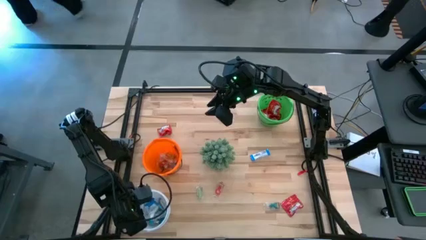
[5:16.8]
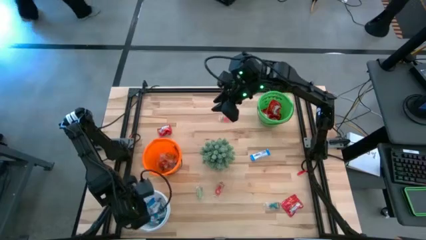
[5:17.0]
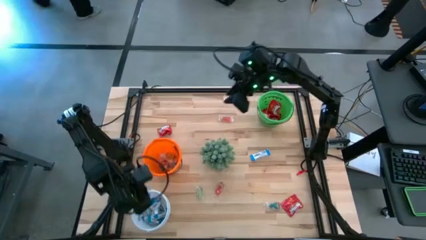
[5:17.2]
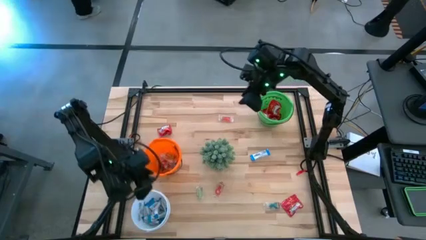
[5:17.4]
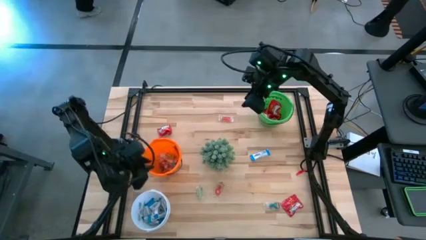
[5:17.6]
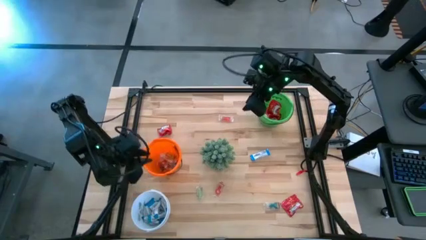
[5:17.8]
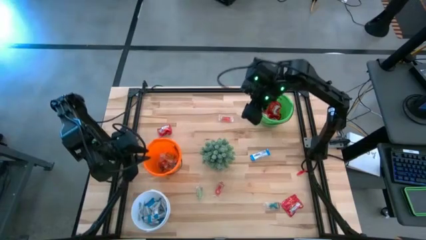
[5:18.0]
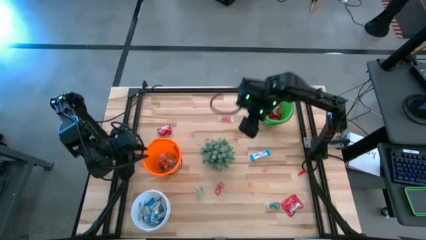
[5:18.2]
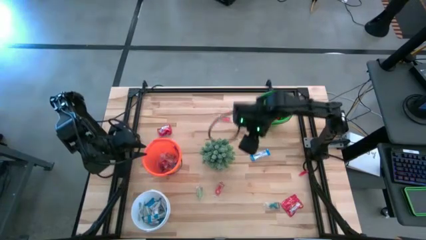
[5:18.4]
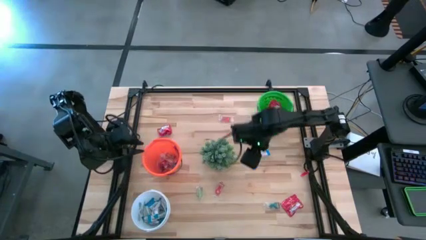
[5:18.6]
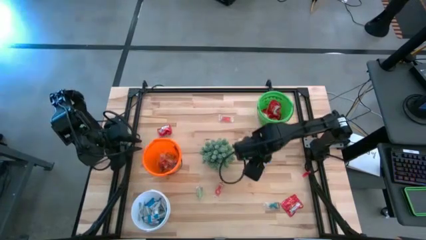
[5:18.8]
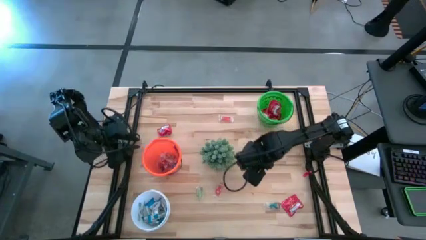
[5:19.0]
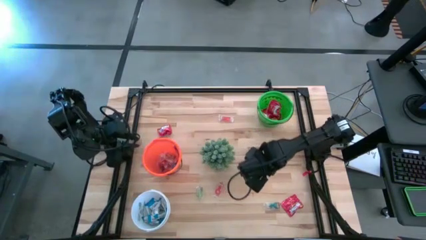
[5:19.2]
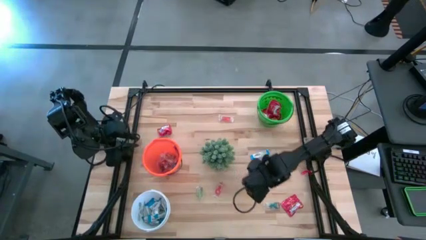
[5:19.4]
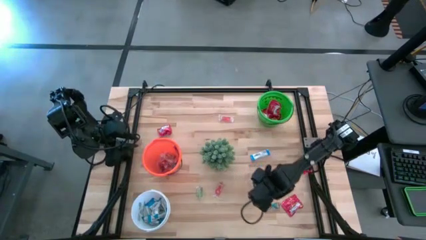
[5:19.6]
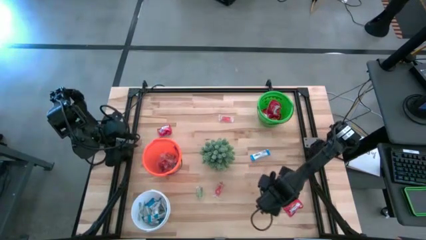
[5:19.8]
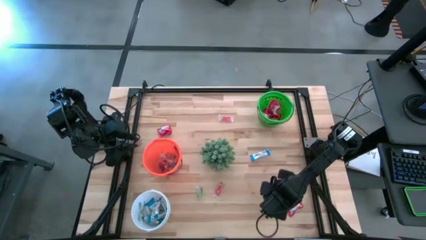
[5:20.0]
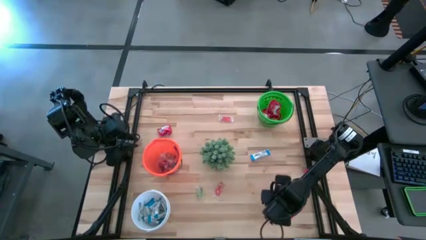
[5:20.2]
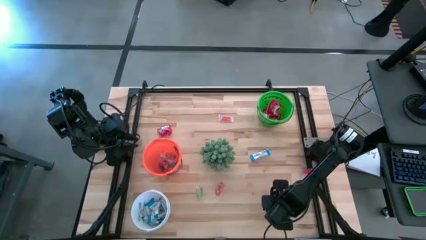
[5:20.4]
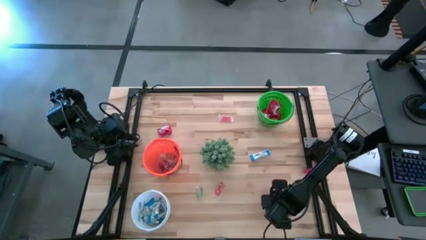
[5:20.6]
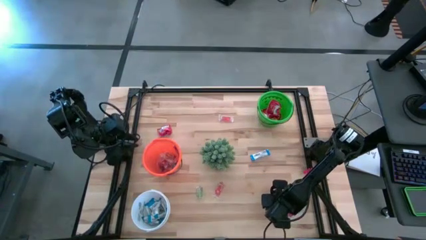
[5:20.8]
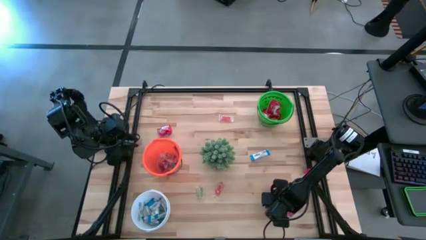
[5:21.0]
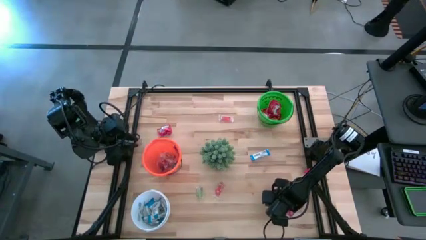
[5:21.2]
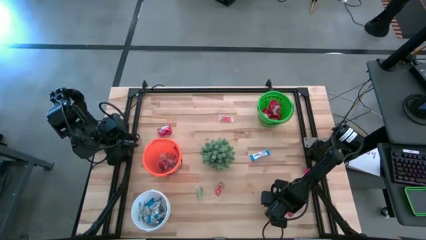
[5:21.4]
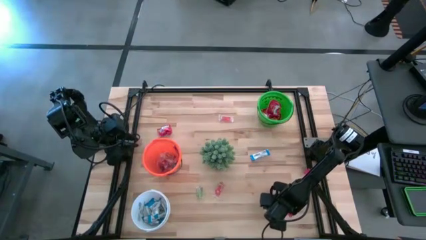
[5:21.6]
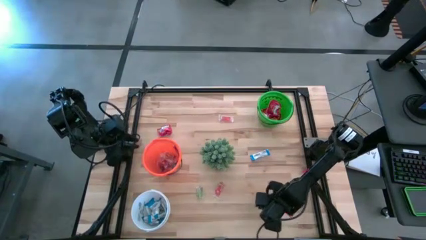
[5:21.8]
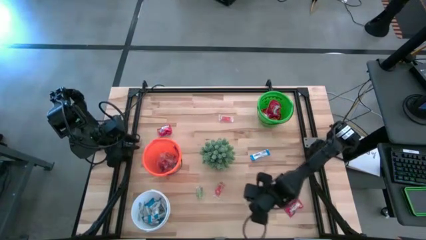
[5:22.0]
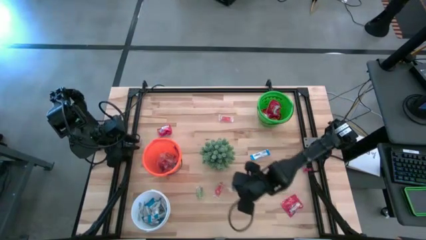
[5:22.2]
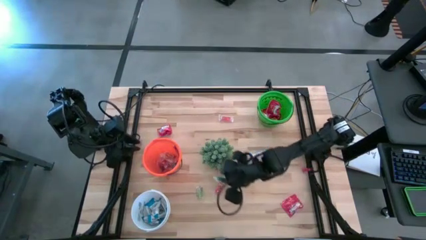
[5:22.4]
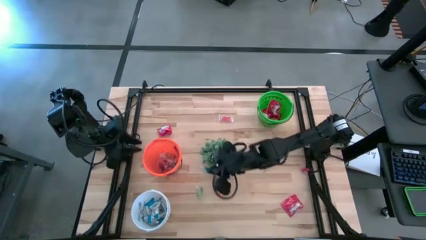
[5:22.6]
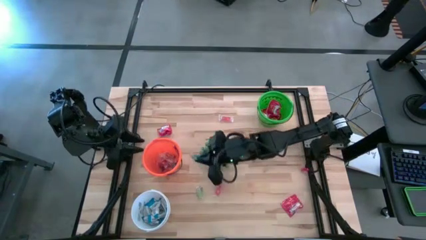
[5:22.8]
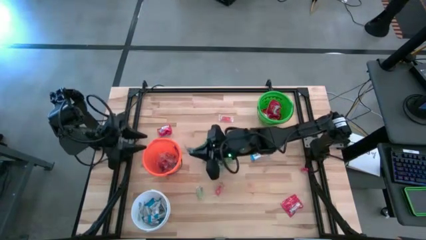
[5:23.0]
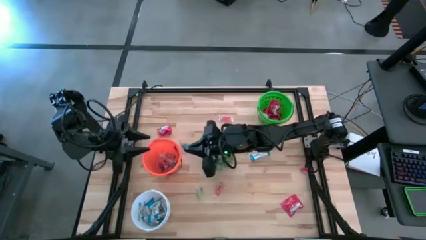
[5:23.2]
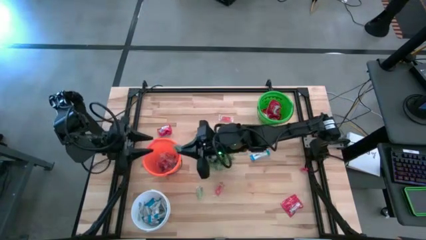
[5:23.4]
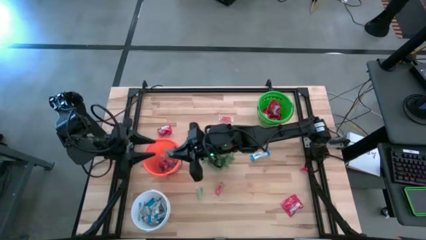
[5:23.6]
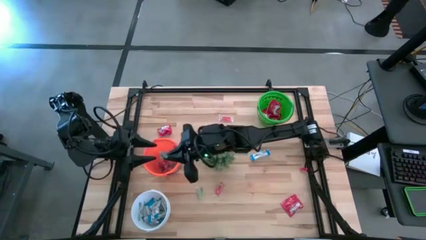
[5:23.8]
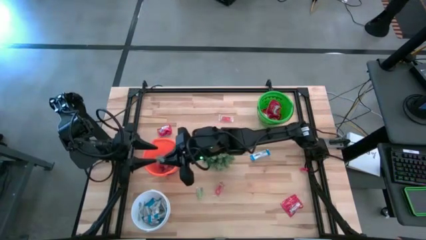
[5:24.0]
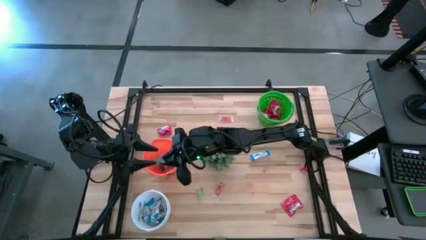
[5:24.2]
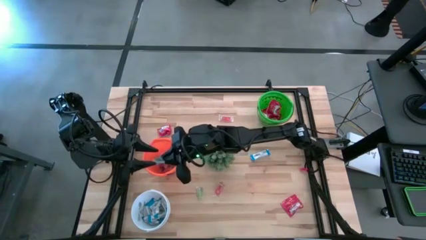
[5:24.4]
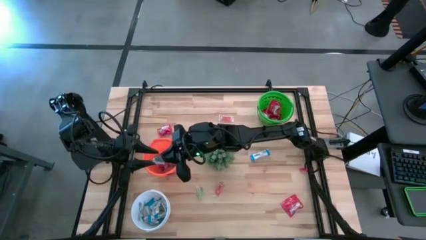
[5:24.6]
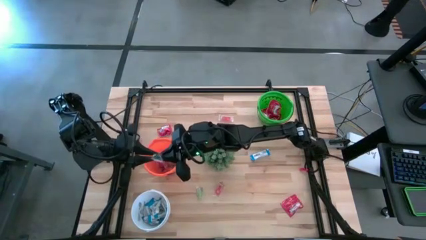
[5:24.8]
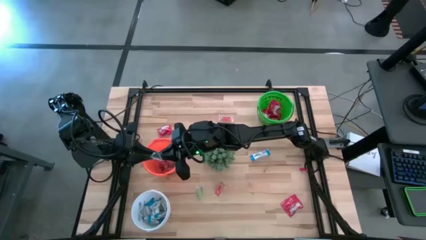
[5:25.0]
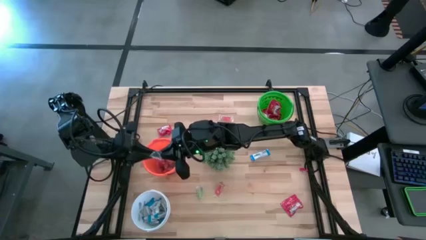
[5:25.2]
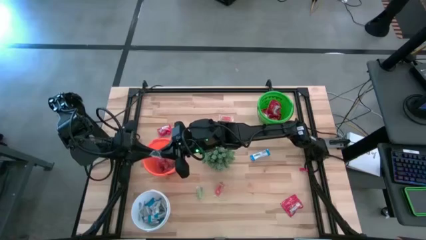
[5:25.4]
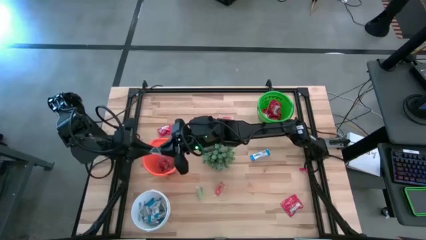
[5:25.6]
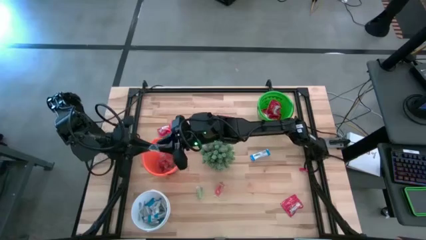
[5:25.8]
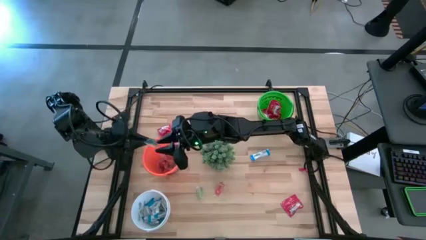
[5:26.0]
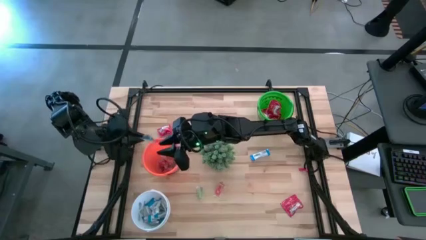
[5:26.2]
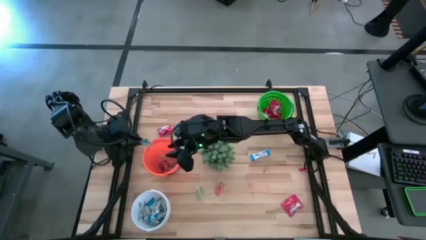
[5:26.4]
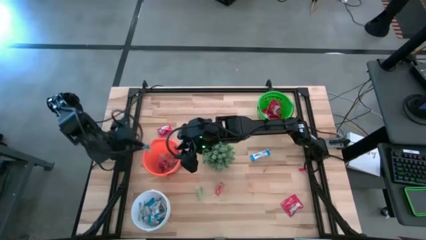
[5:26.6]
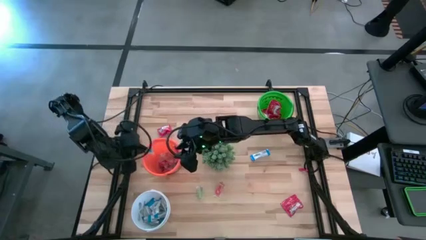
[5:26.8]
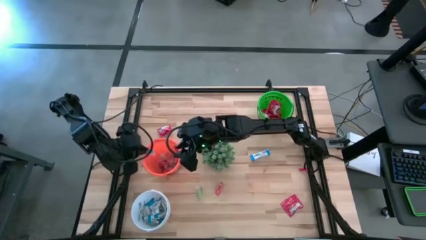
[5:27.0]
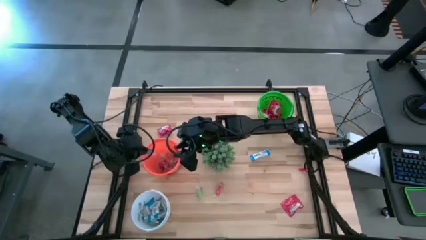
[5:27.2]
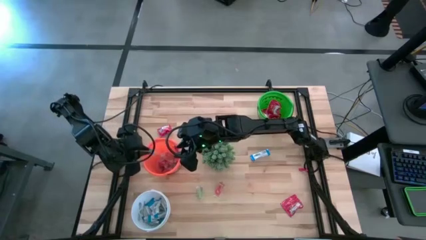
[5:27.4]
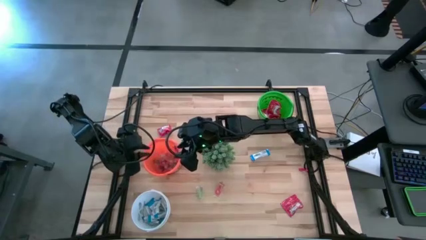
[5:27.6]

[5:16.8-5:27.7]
Task: Sort candy
Put the blue gummy into the orange bucket

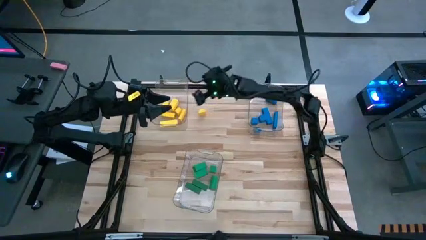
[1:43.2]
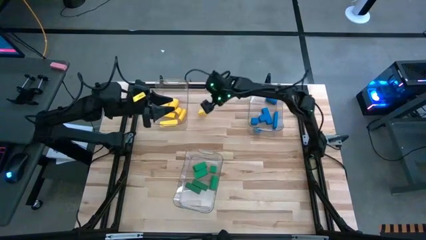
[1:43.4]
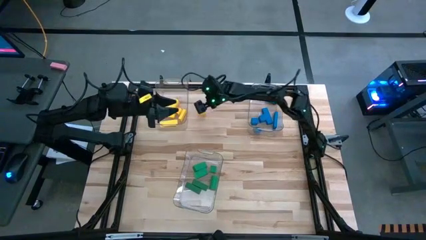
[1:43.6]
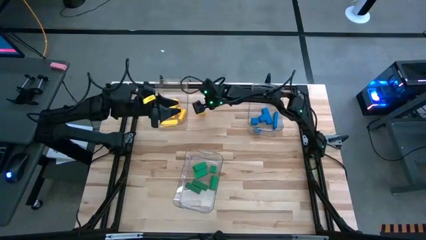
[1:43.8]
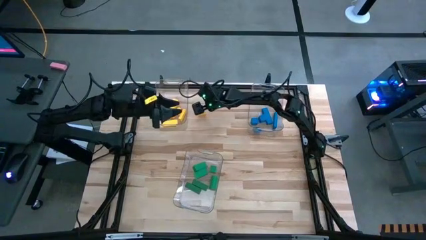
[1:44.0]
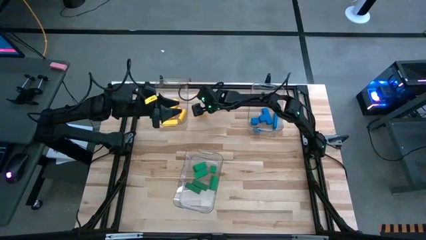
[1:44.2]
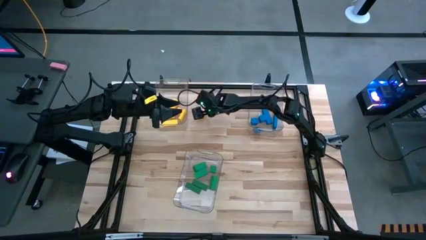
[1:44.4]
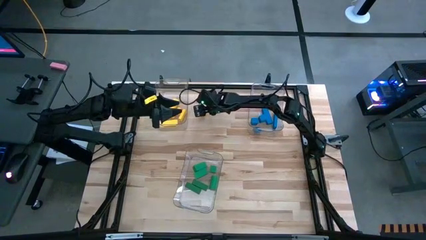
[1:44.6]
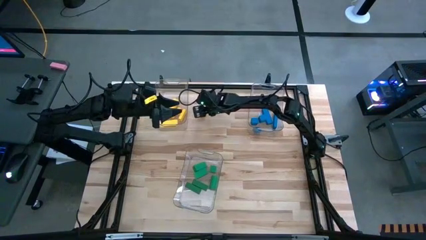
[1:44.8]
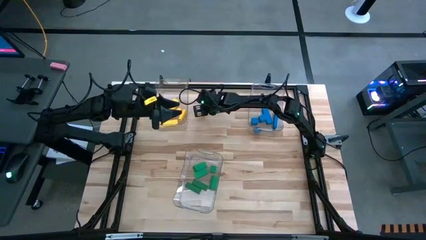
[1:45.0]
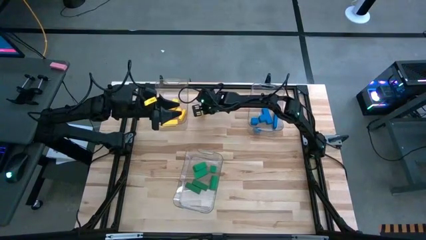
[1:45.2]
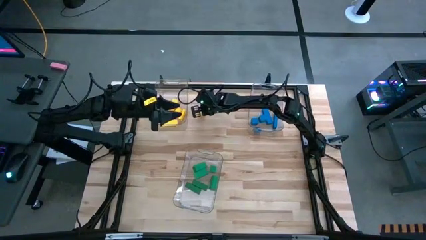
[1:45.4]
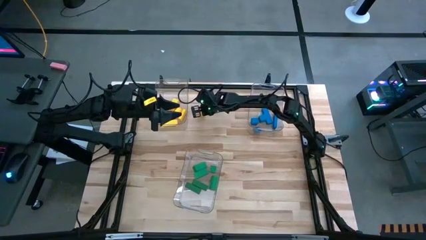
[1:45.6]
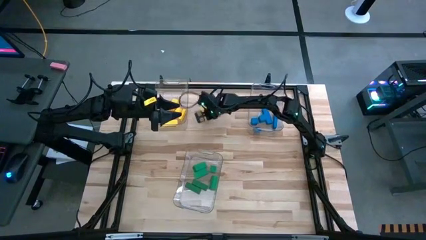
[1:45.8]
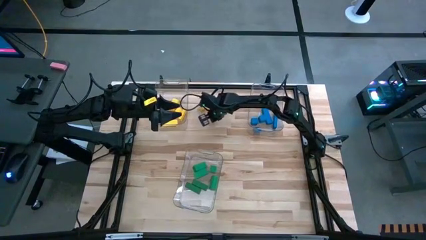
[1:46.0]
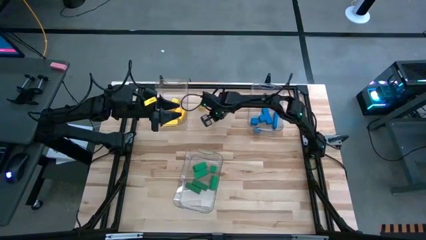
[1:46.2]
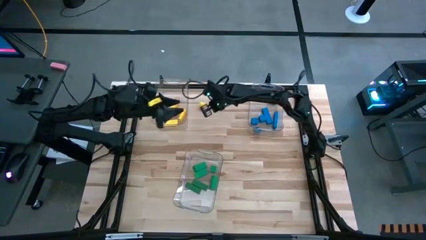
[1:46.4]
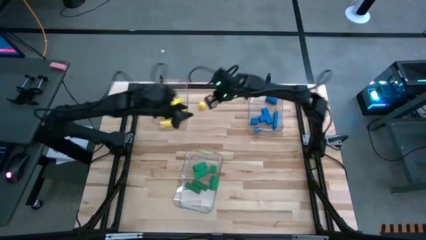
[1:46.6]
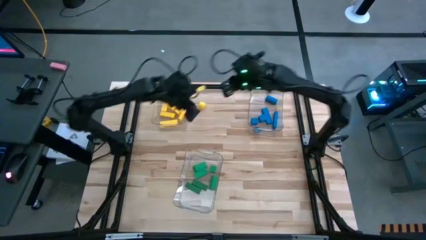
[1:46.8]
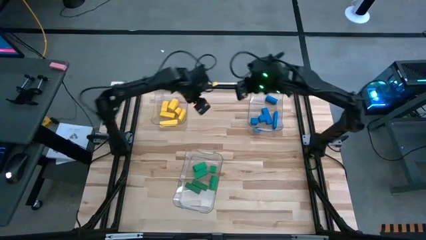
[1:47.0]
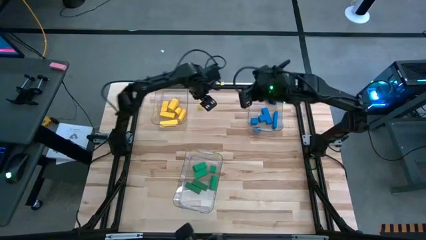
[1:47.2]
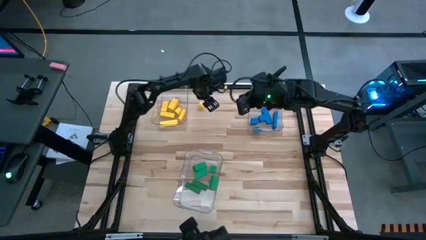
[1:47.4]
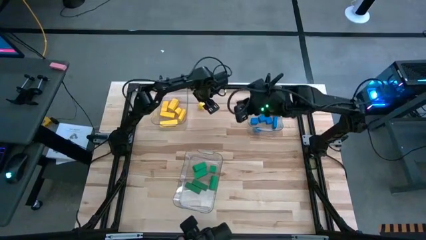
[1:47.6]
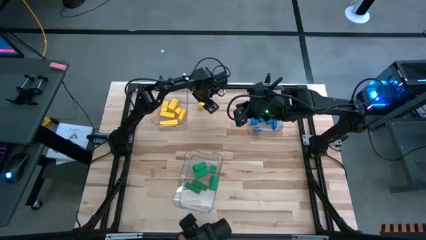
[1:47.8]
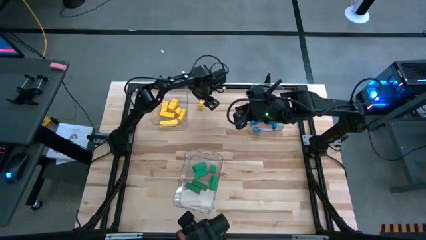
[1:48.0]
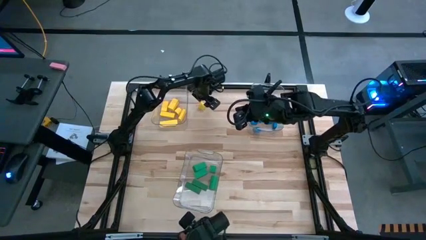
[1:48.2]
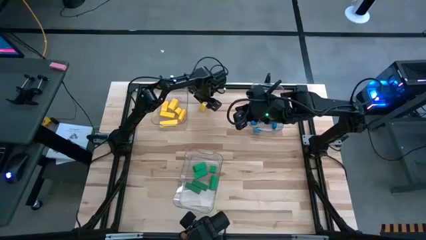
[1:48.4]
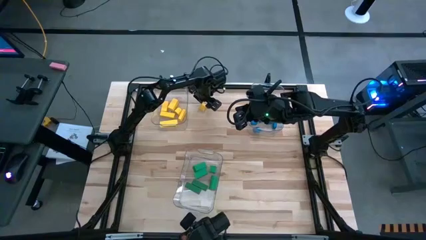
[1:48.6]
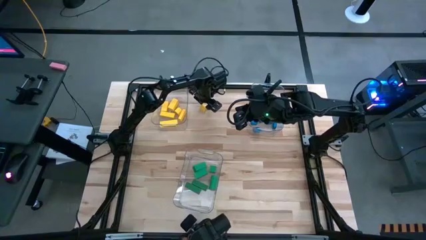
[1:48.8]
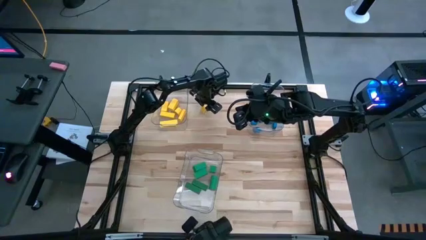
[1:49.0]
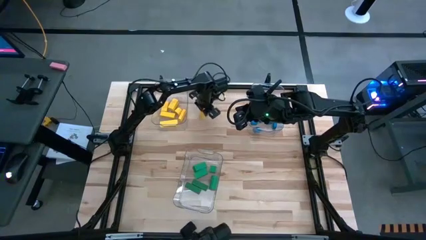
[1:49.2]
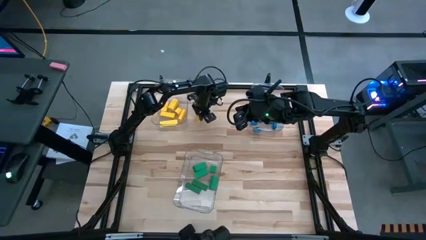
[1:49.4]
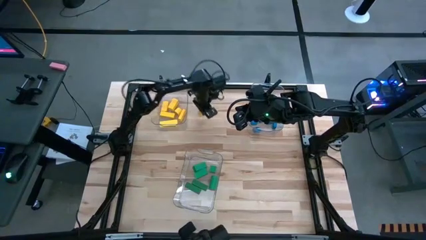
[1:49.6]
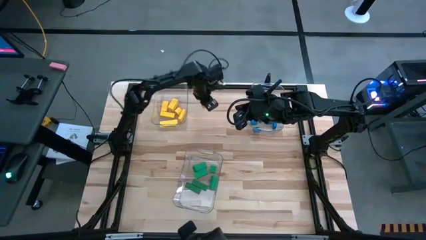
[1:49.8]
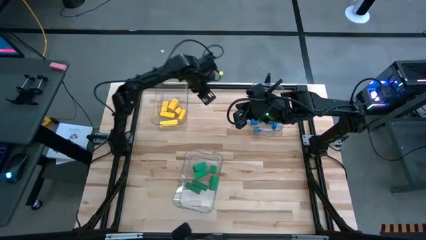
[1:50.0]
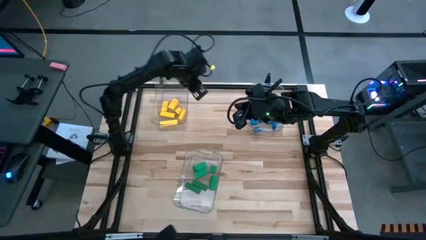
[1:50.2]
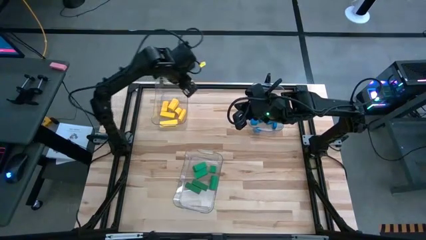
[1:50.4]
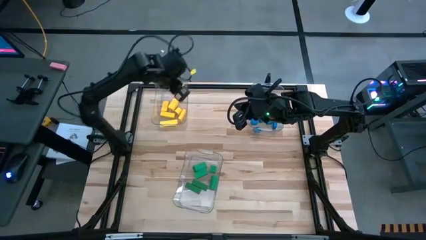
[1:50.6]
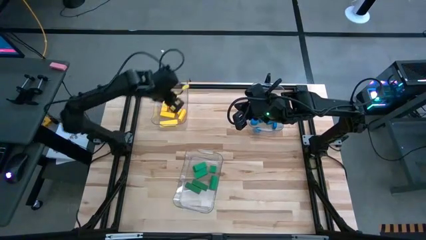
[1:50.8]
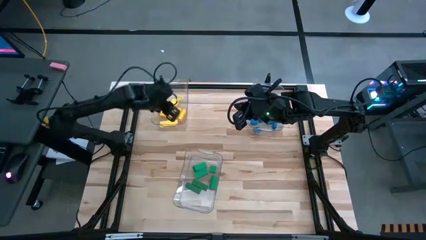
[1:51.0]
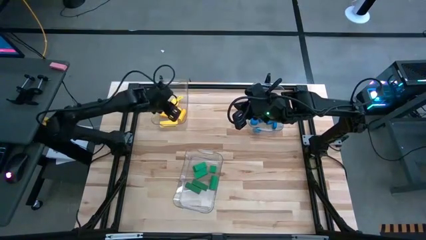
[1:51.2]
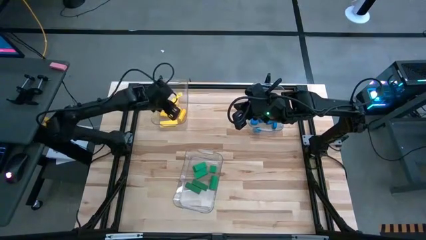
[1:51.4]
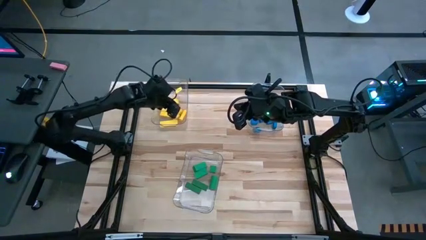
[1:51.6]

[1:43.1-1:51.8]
Task: Sort blocks
Put the yellow block into the top left transparent bin
